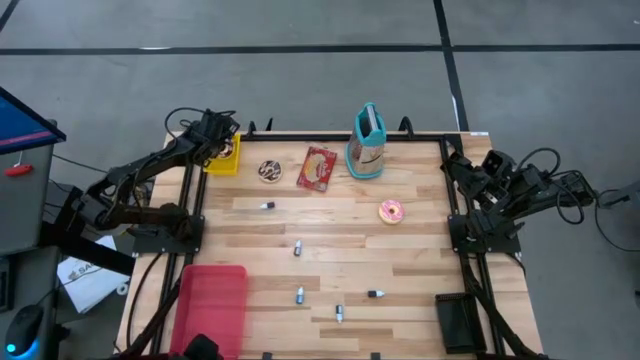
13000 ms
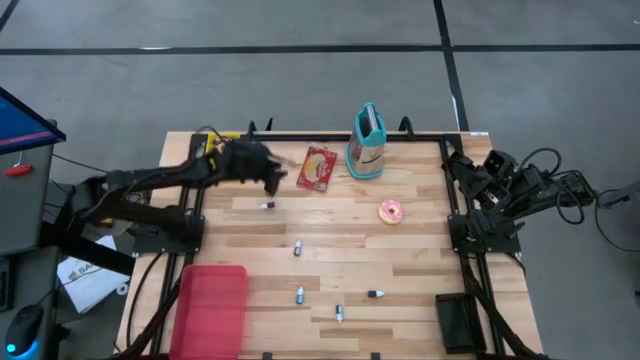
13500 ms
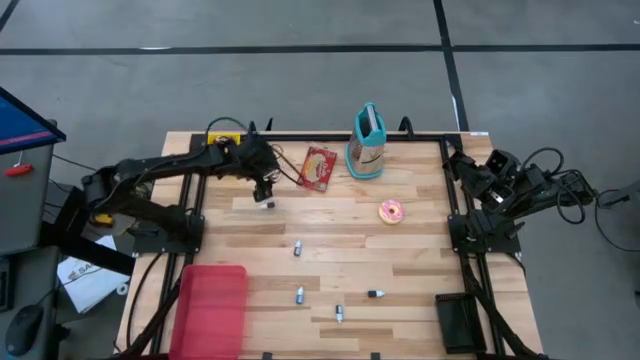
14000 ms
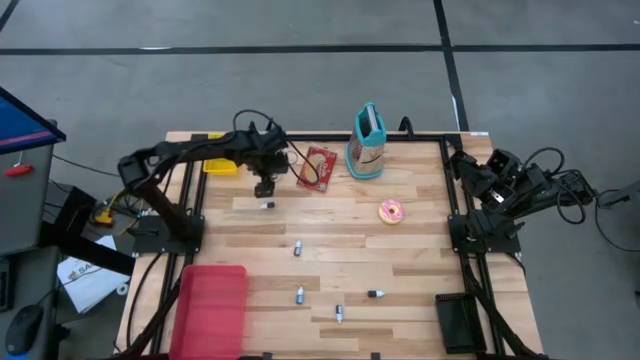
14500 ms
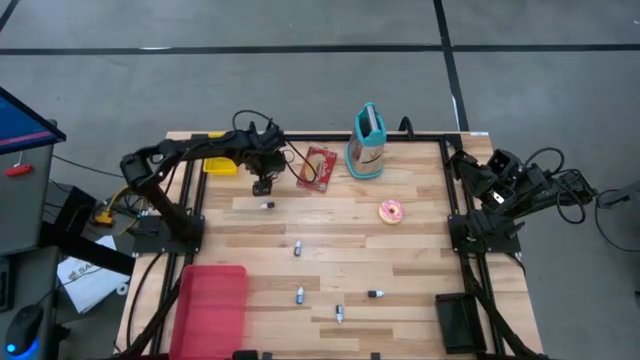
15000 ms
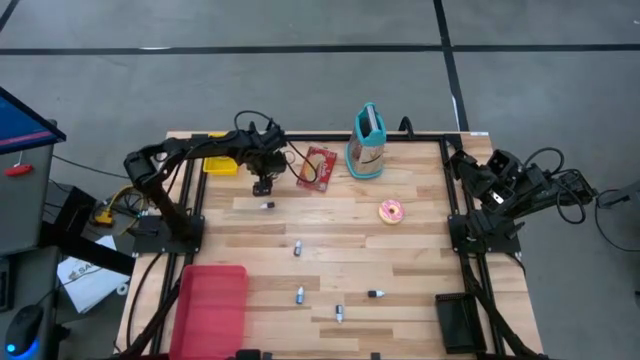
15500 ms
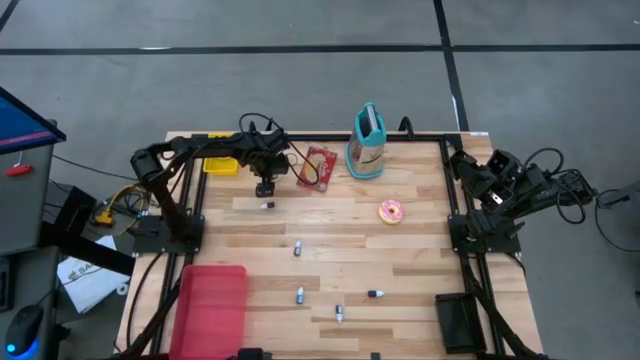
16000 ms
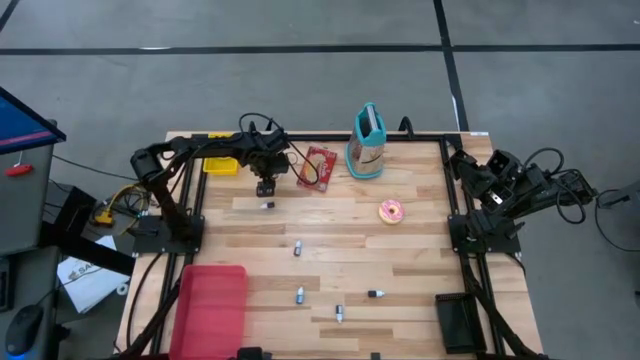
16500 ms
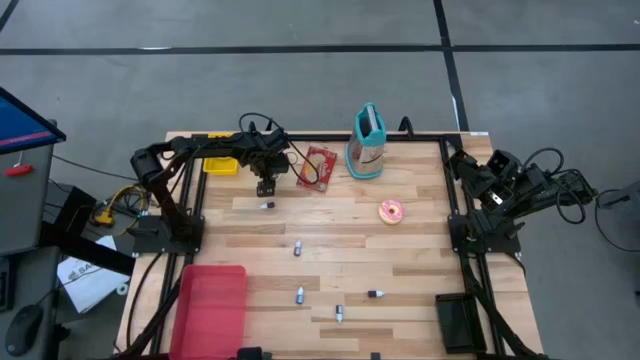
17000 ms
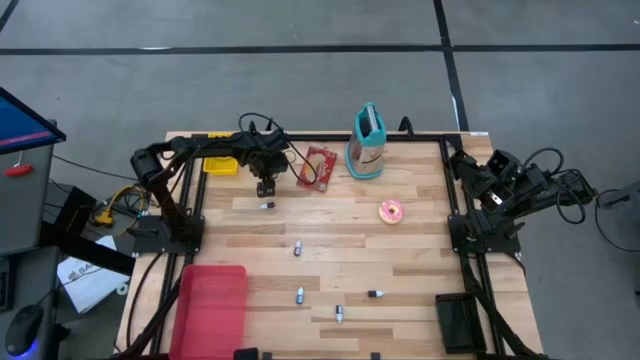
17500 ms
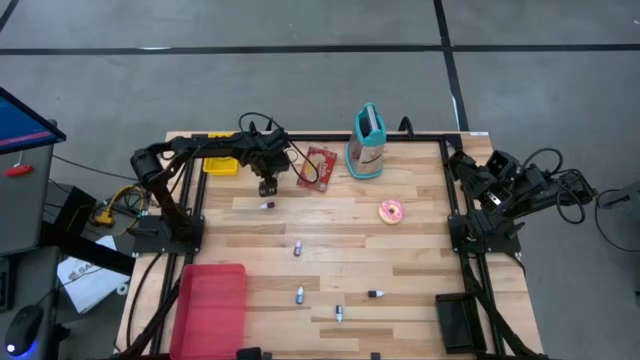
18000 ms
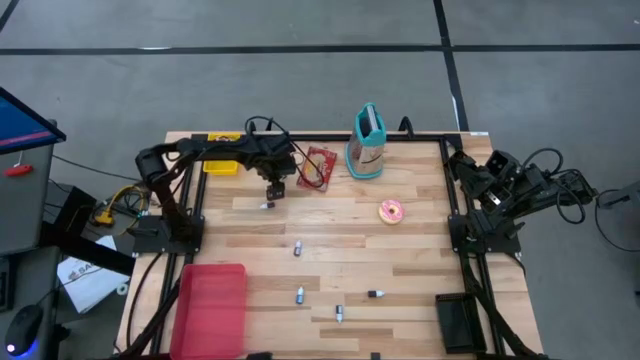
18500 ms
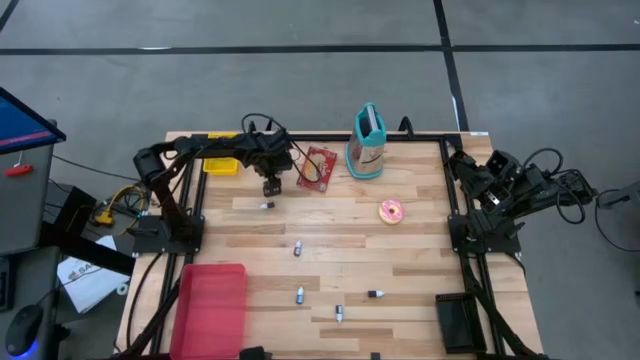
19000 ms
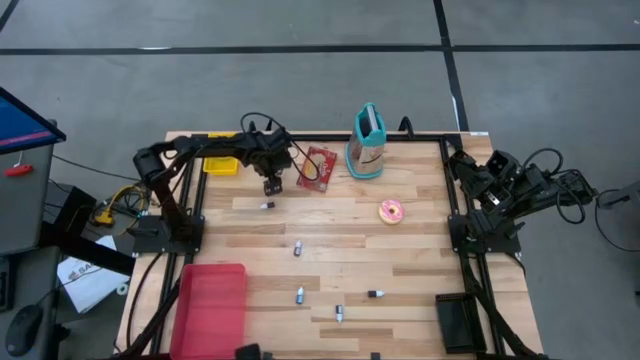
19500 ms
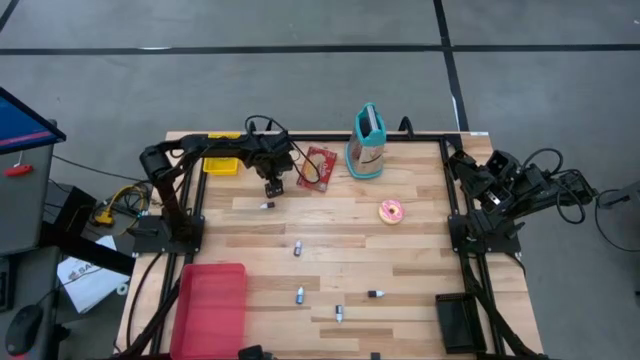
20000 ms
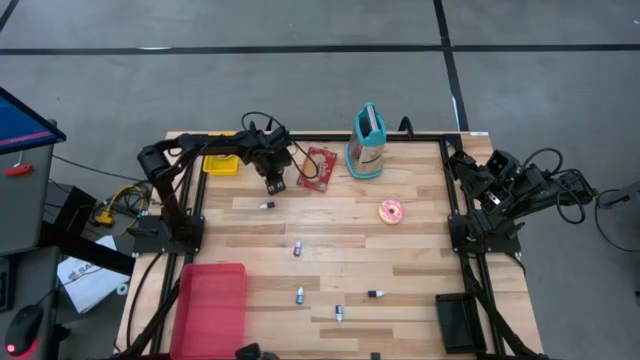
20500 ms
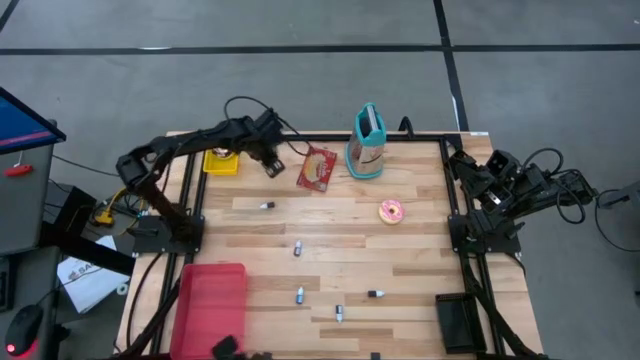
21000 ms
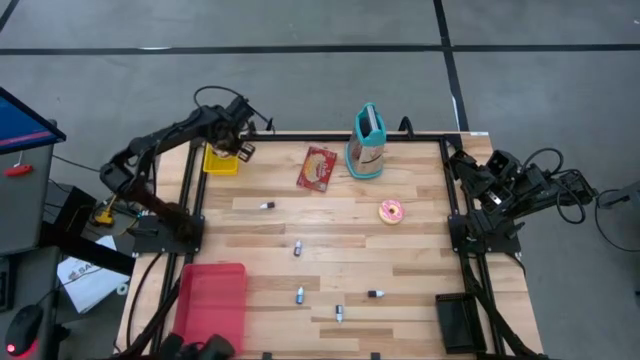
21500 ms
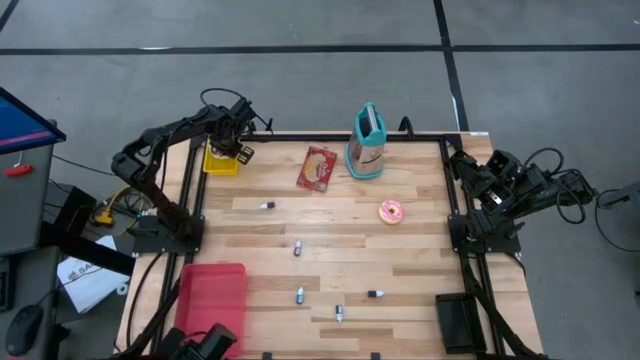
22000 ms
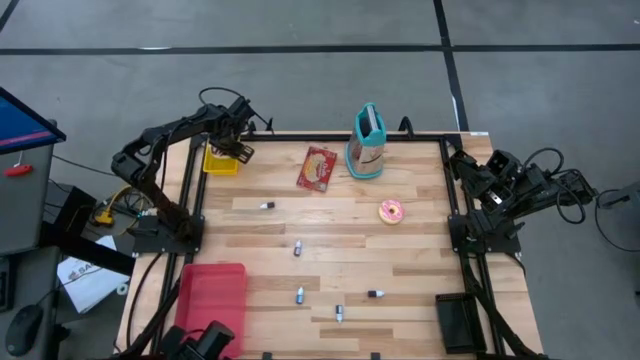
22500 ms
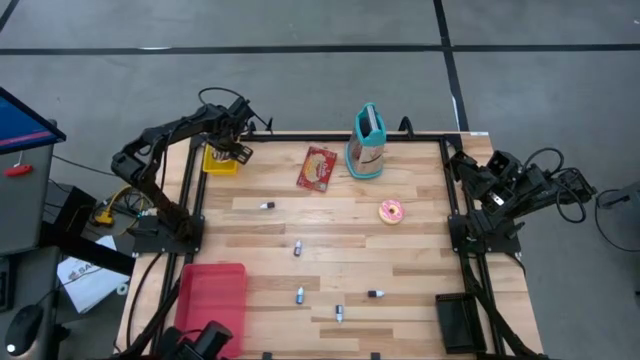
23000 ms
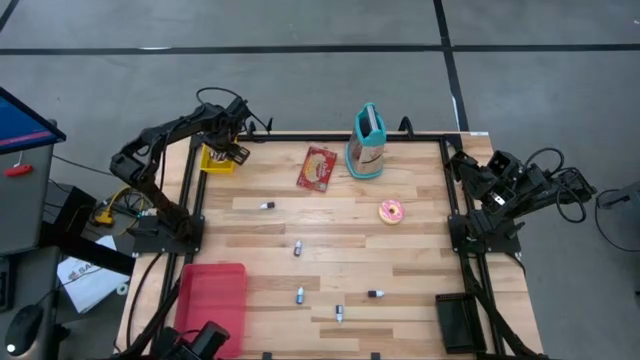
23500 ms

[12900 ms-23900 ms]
Put the black donut into the yellow basket
